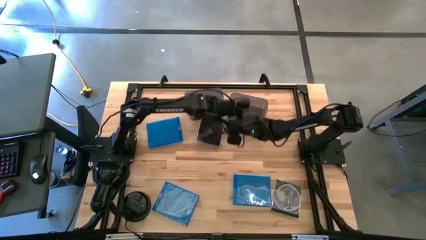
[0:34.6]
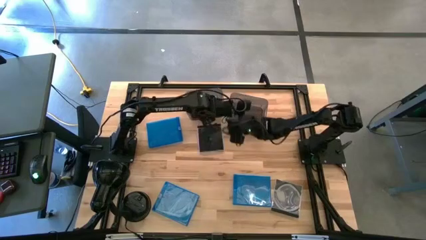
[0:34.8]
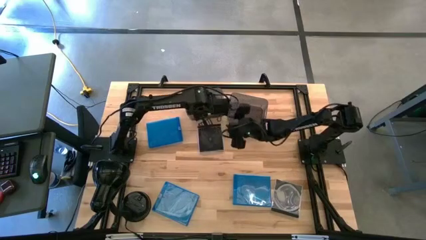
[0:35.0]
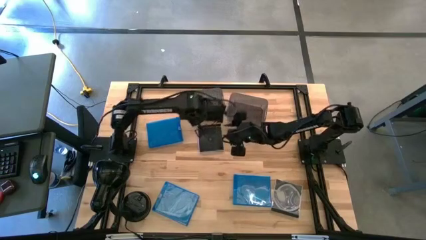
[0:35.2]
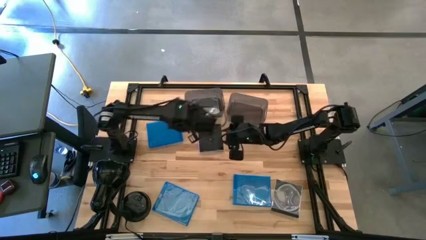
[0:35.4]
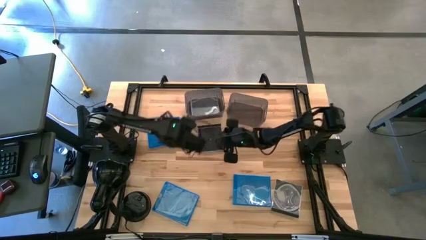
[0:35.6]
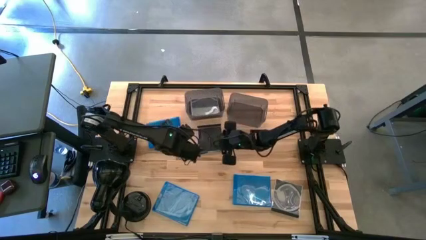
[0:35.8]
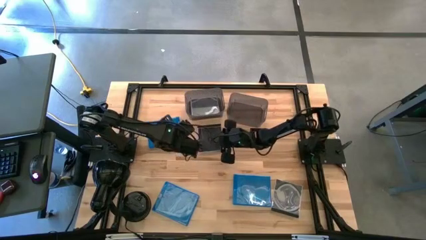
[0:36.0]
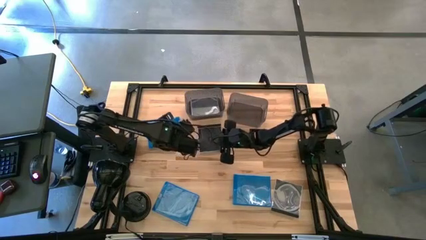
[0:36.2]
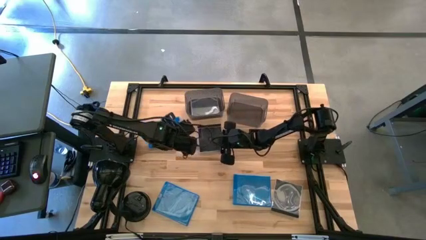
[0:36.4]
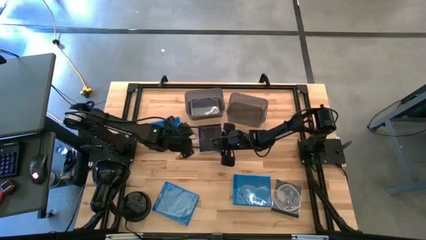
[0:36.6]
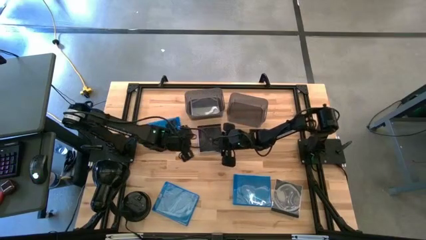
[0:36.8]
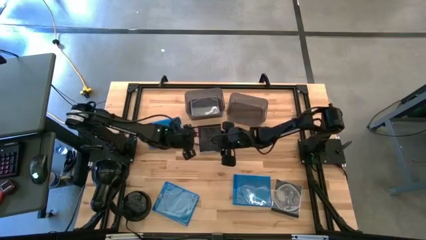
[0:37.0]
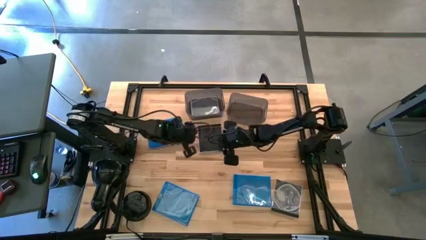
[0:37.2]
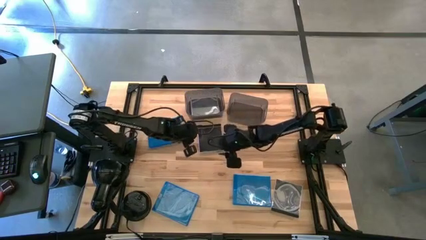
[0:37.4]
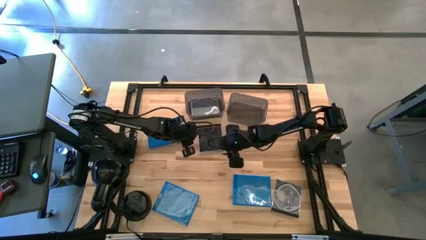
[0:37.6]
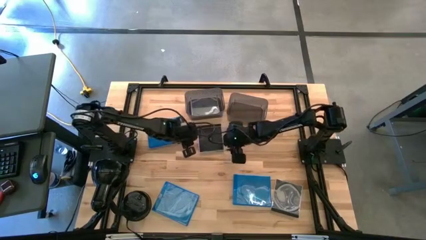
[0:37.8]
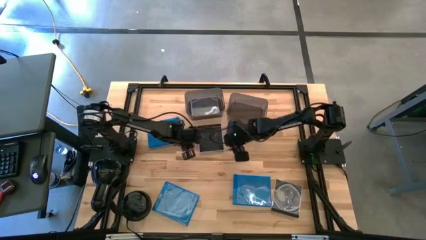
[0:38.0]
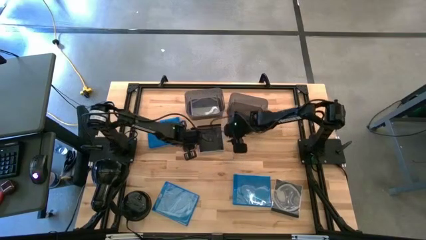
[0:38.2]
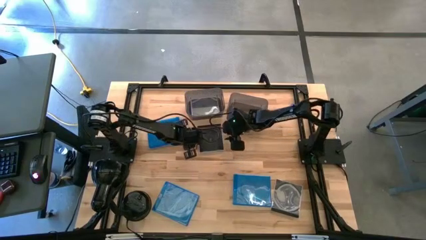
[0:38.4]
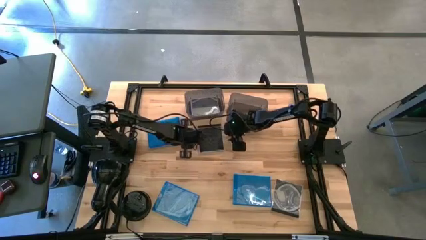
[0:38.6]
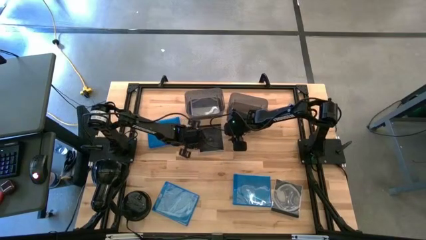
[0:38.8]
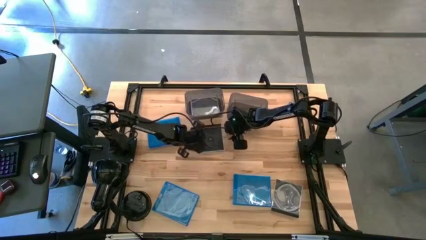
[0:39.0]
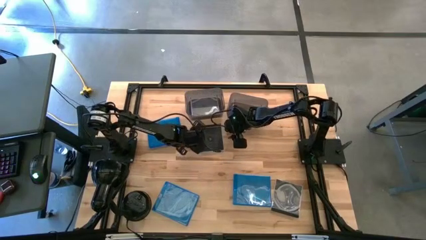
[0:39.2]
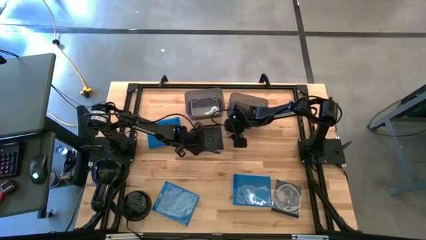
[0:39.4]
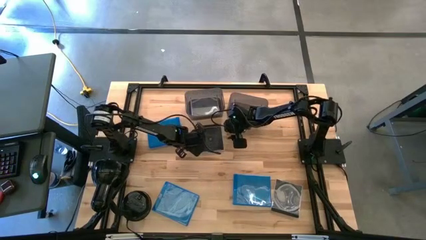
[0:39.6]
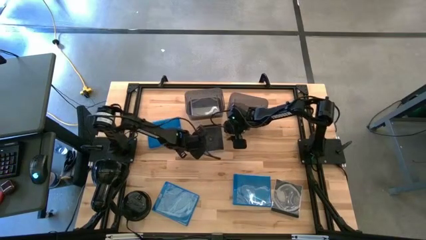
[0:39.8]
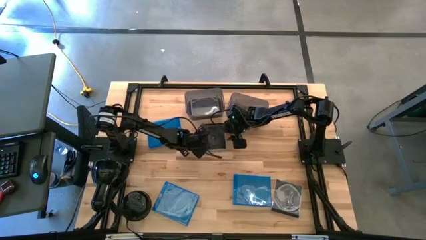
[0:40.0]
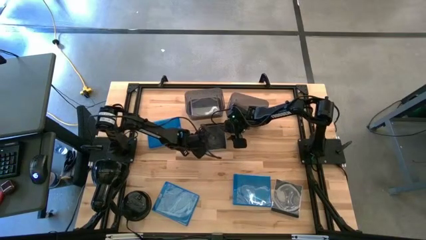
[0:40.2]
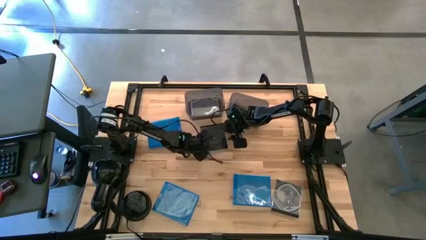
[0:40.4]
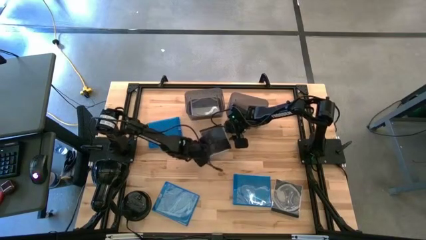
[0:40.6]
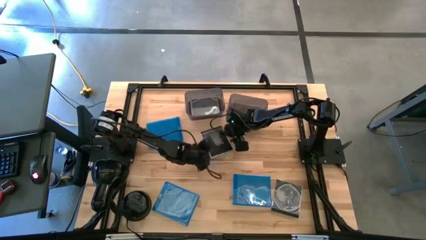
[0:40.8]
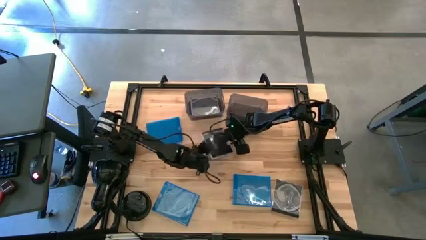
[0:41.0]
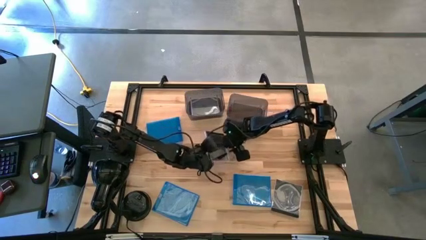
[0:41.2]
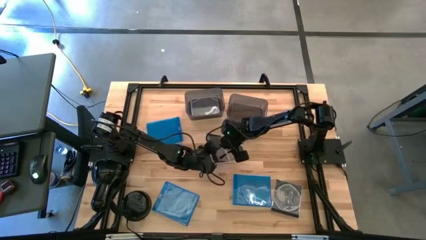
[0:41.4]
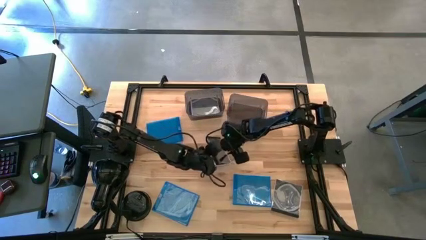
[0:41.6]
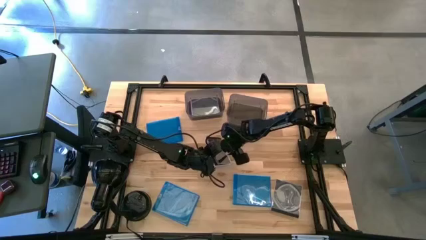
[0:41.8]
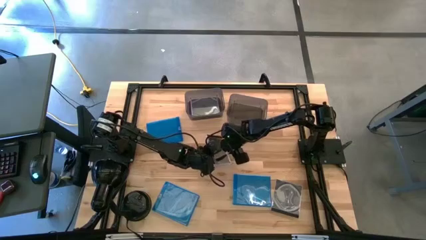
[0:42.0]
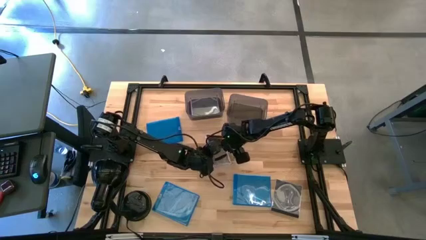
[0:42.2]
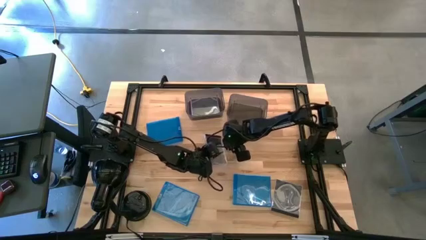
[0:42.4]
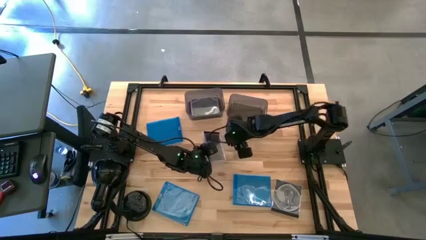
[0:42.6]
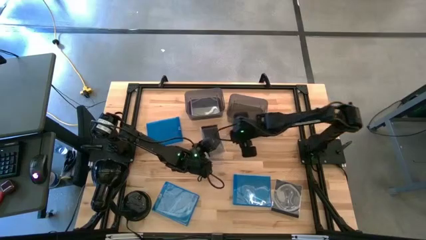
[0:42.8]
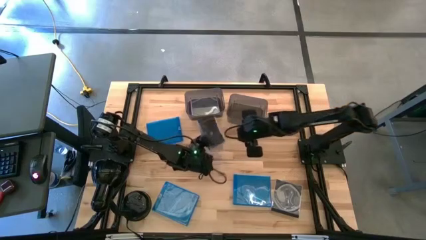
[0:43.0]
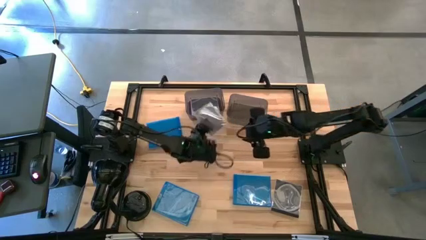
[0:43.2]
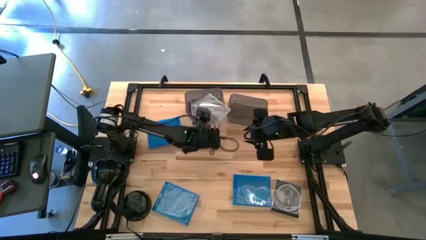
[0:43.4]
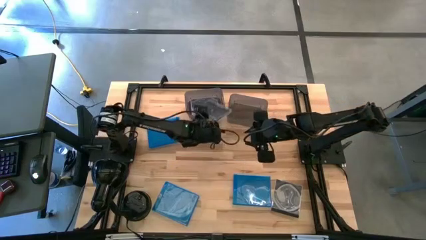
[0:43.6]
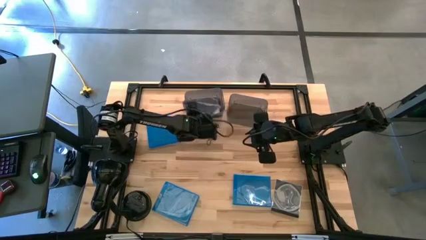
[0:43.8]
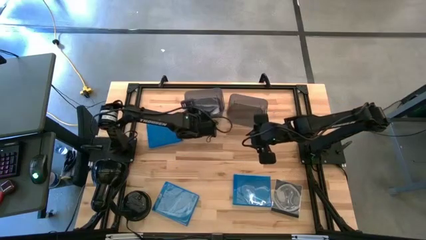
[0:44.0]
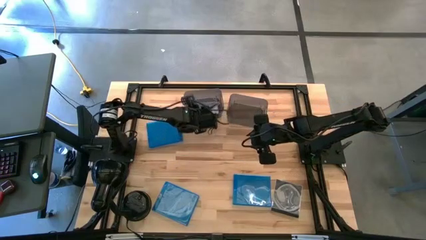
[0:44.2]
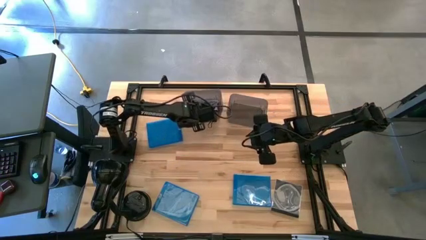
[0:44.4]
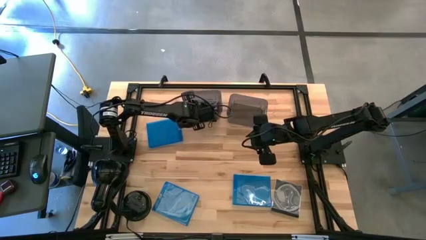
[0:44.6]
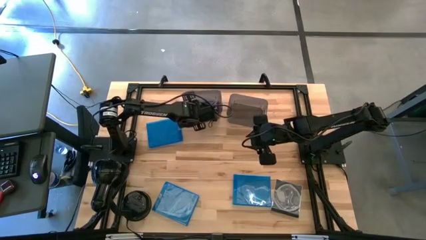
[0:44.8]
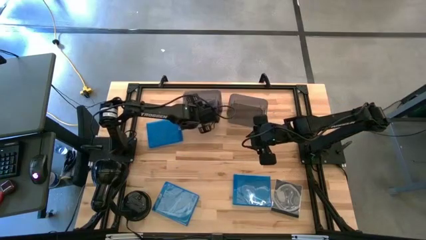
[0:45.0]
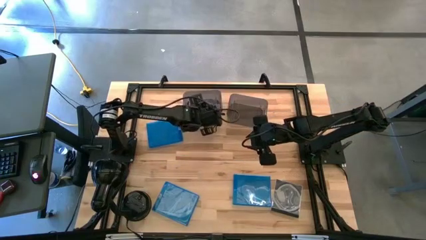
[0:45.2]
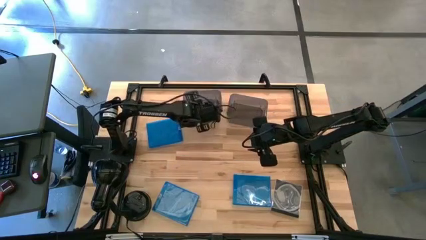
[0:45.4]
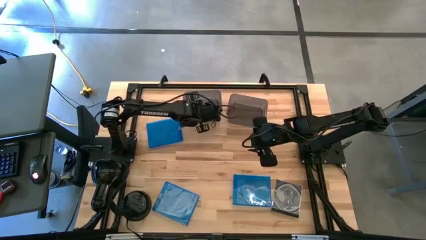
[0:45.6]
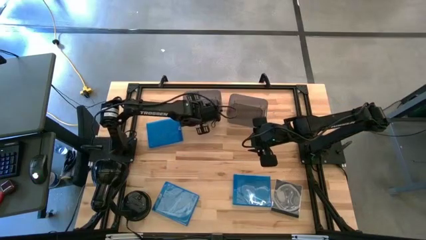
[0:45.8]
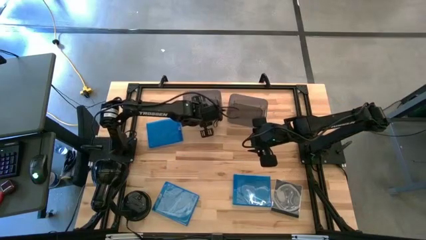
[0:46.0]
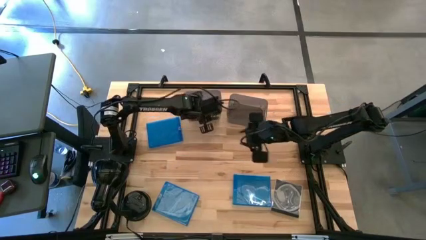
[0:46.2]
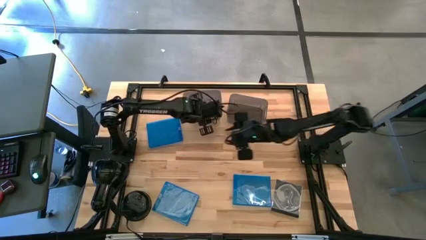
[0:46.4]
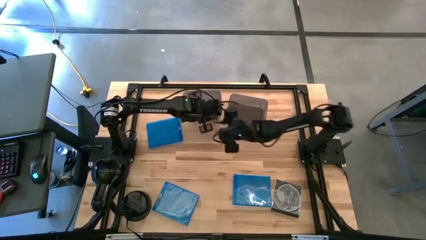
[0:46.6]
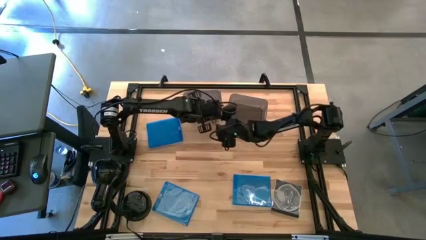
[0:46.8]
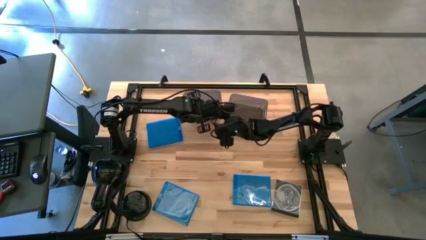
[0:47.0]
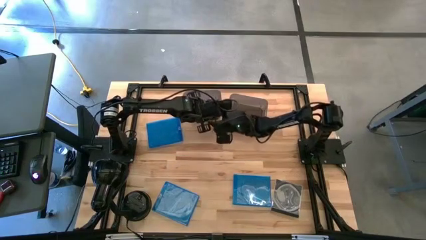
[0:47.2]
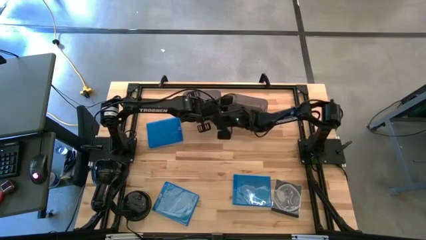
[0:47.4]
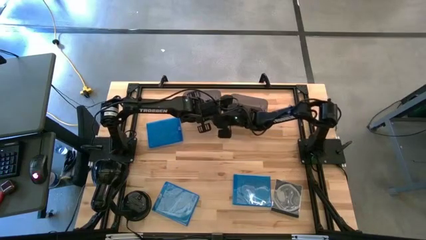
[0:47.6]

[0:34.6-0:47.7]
Task: Pick & place jewel cases by type
Put the top black CD case into the left black bin

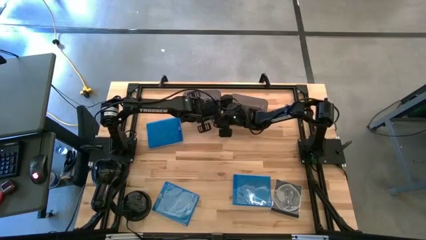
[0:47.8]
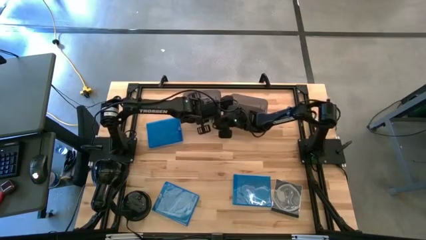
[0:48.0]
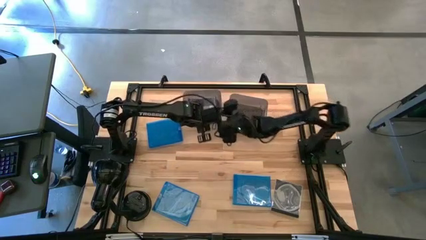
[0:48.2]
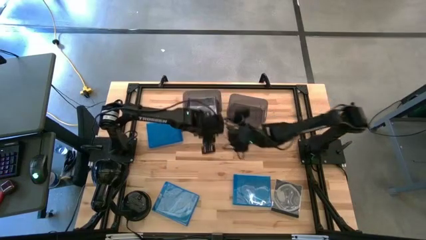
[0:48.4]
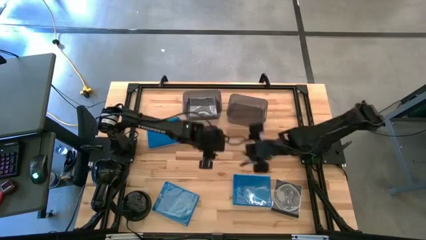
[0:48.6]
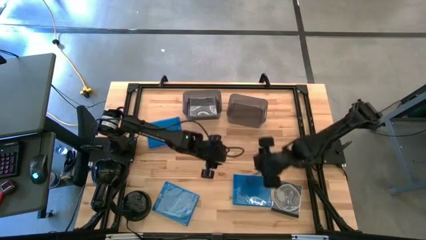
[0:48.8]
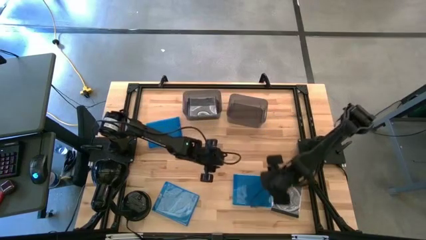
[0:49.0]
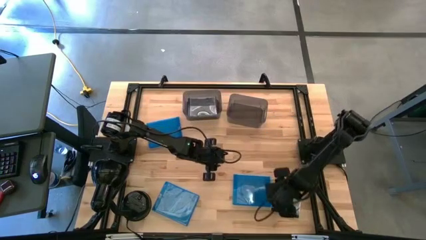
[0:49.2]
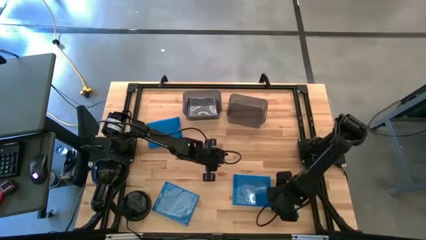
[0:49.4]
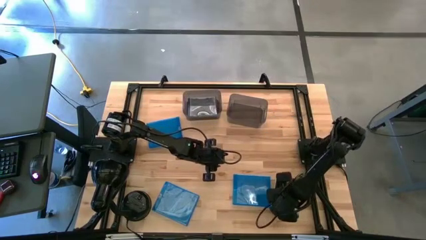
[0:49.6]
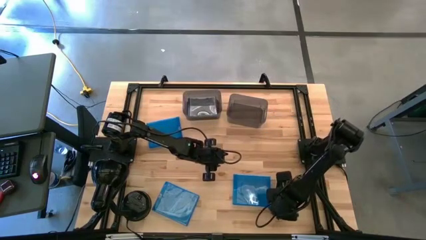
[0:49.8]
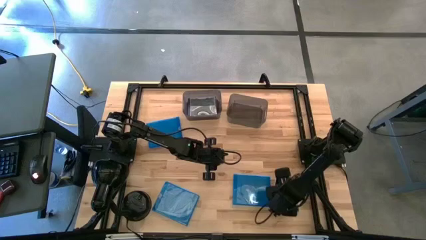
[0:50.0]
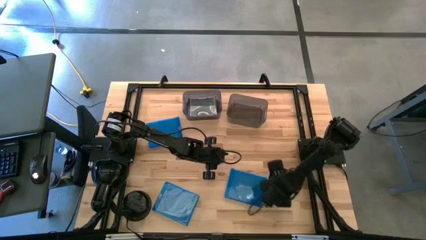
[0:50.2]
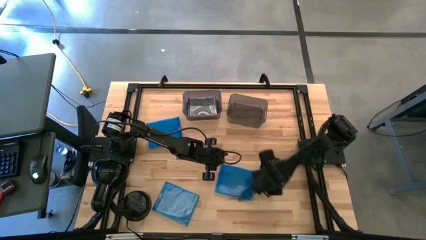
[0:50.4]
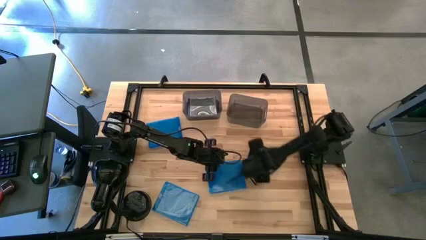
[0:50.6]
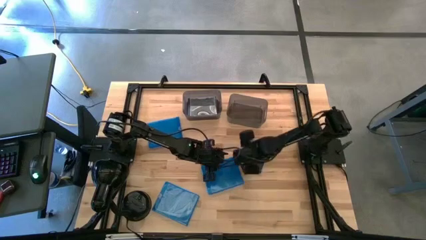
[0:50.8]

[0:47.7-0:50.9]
Move the black CD case to the center of the table
